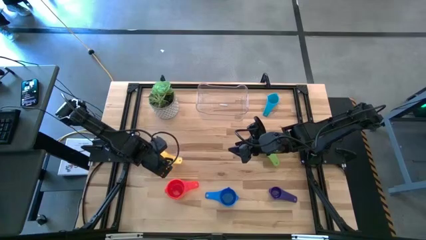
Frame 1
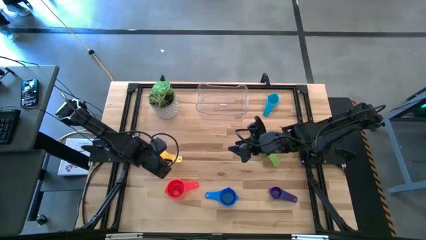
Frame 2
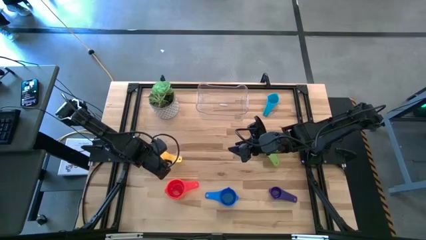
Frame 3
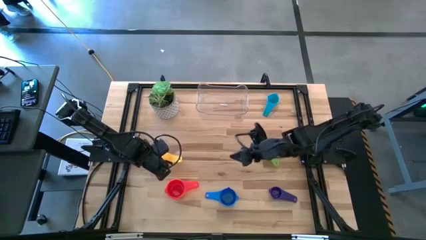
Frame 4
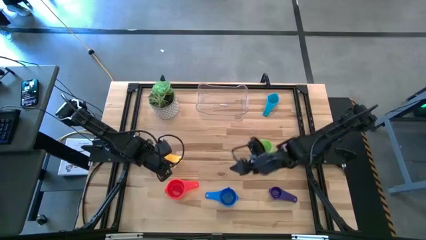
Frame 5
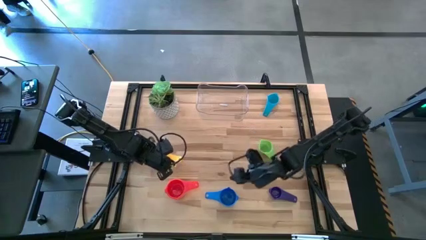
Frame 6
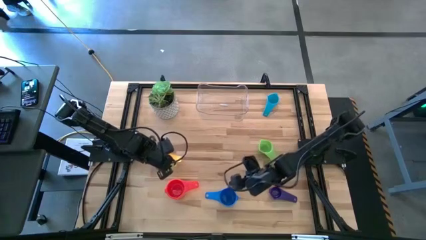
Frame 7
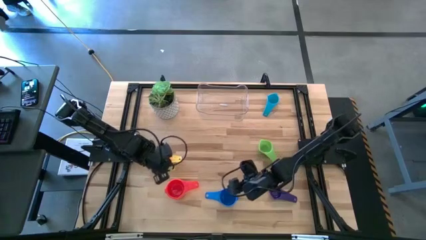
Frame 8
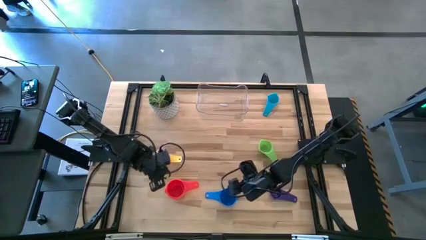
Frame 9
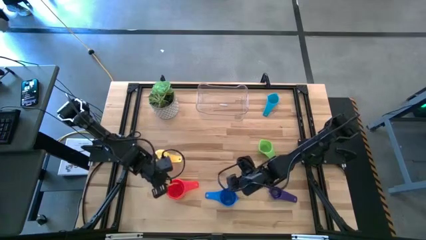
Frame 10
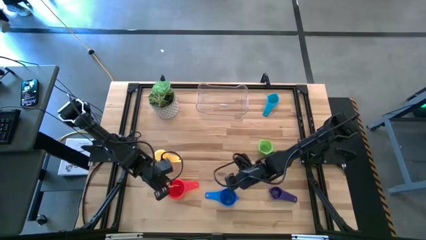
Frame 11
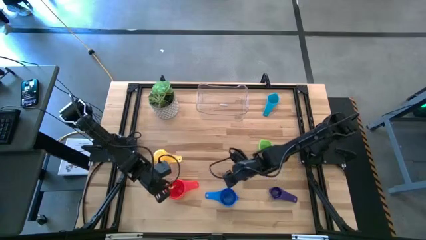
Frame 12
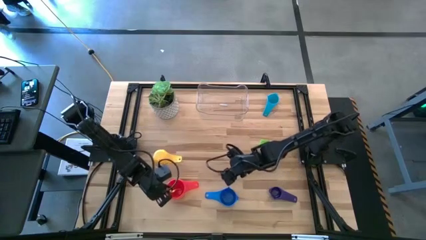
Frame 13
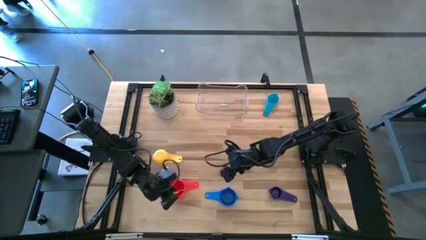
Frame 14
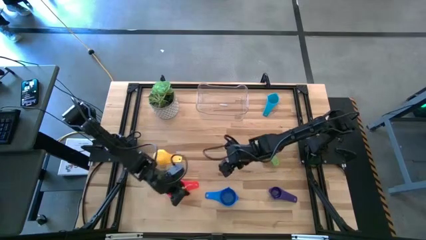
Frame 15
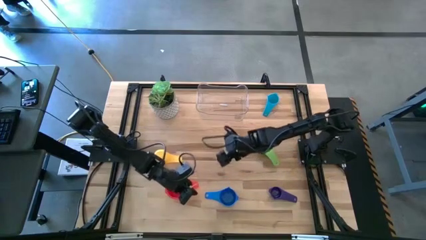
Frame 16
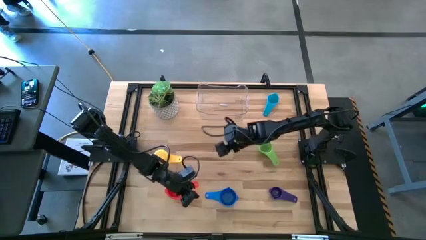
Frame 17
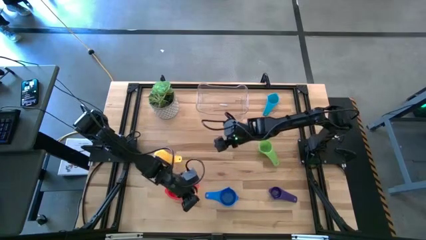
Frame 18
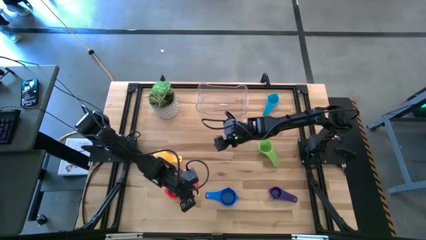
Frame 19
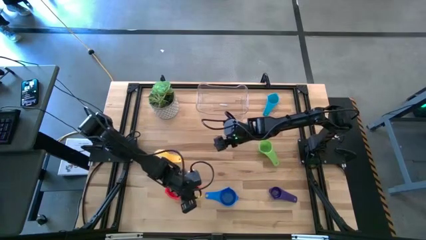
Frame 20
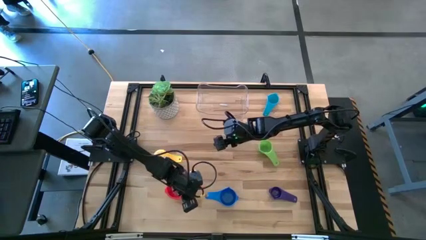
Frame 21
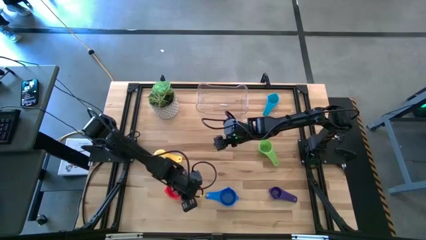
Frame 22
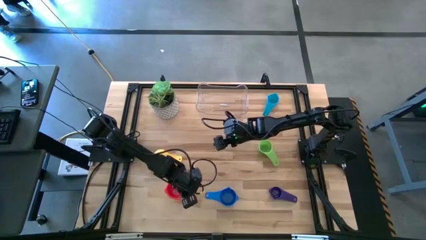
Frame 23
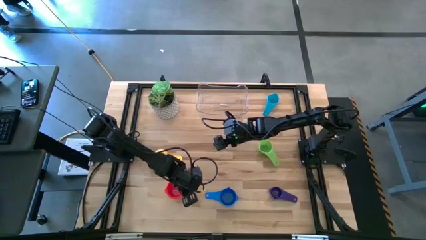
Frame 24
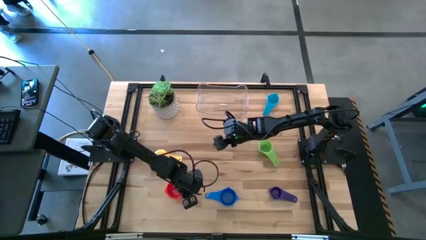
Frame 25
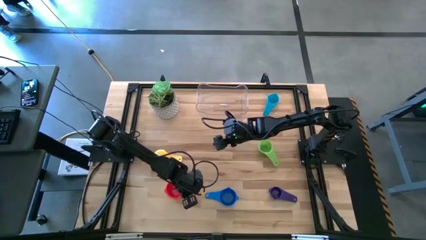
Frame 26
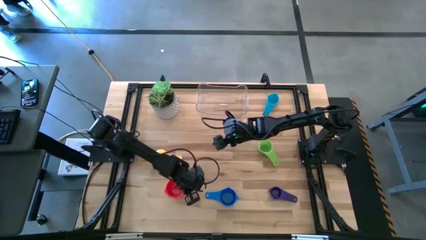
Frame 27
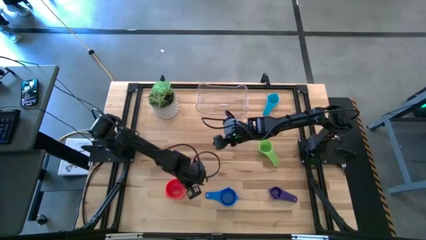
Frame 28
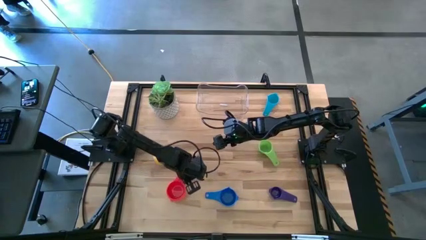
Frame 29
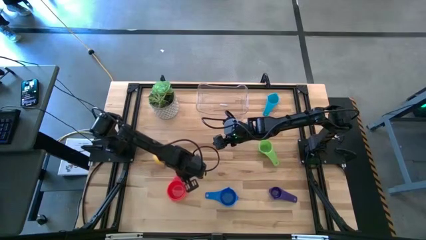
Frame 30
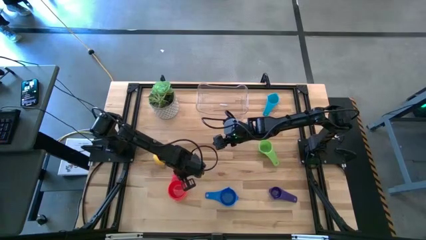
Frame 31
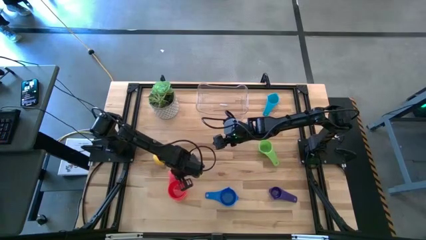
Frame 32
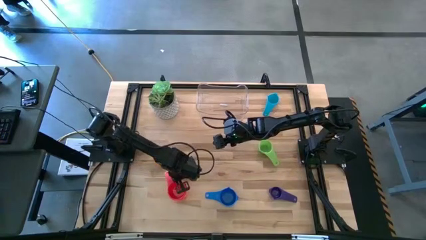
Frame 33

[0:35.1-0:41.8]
Task: Nest measuring cups in basket
Adjust the stacked measuring cups

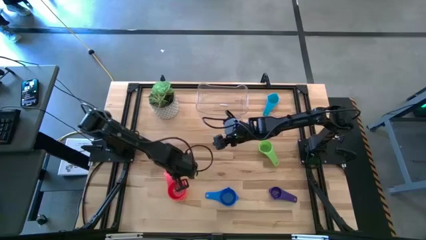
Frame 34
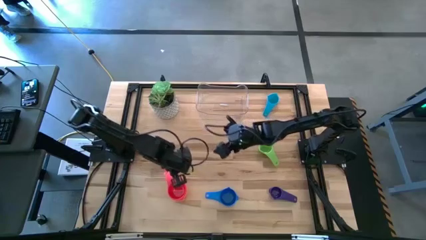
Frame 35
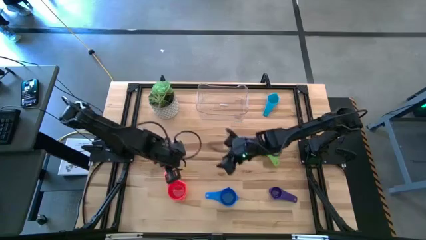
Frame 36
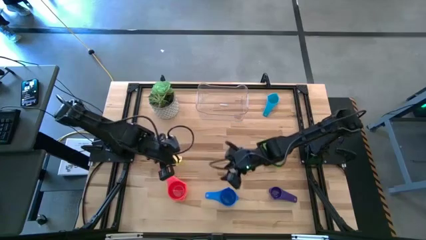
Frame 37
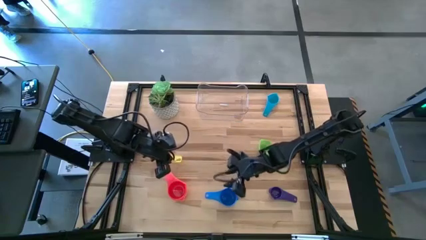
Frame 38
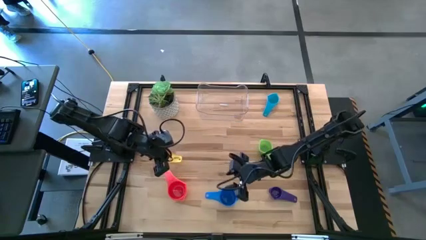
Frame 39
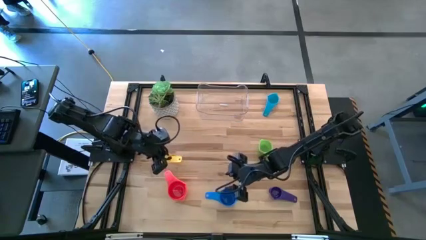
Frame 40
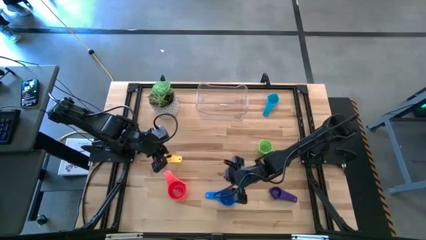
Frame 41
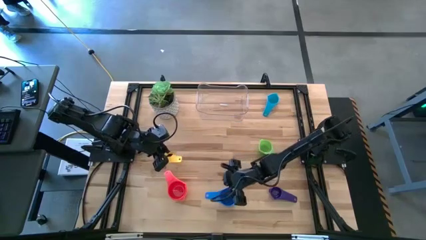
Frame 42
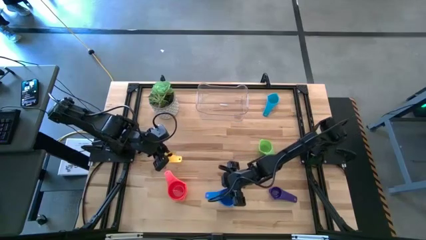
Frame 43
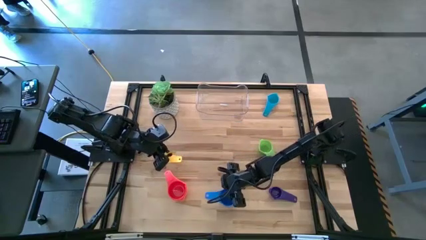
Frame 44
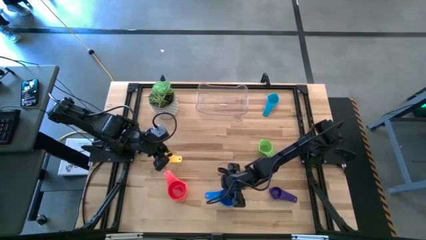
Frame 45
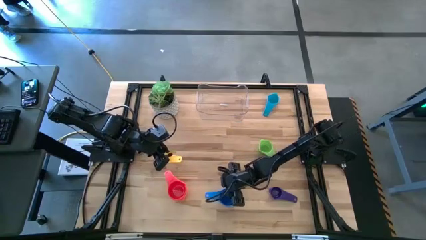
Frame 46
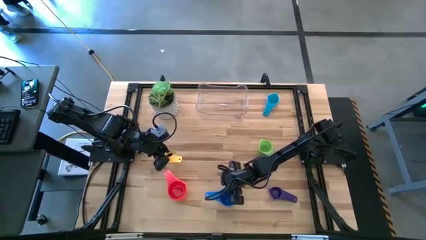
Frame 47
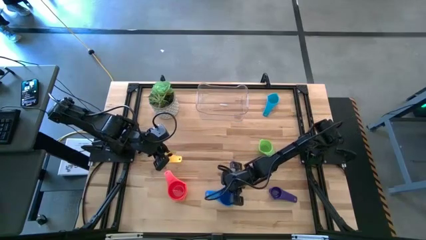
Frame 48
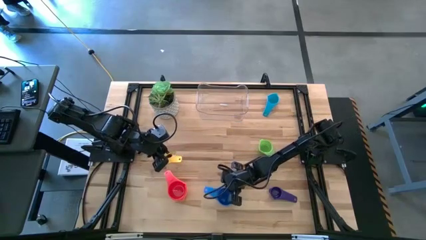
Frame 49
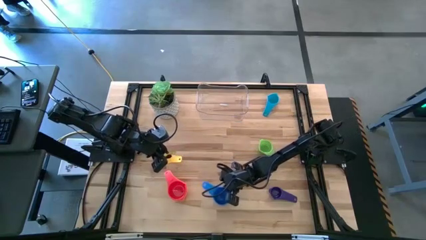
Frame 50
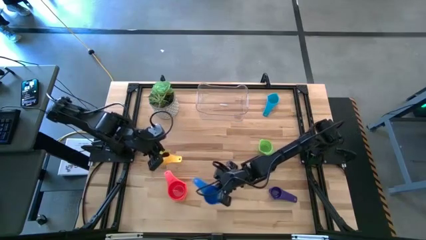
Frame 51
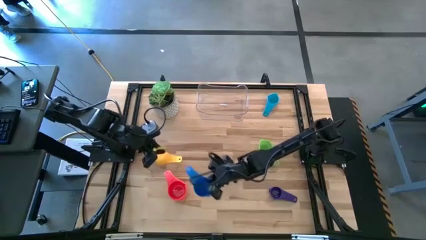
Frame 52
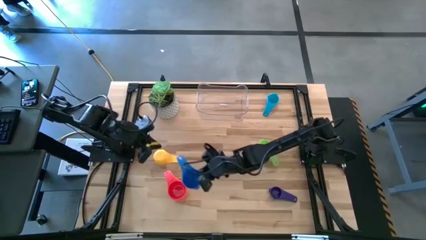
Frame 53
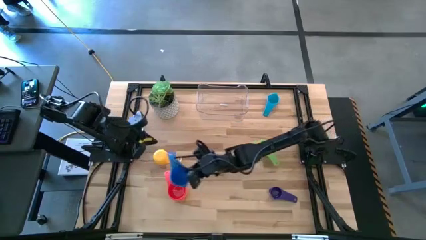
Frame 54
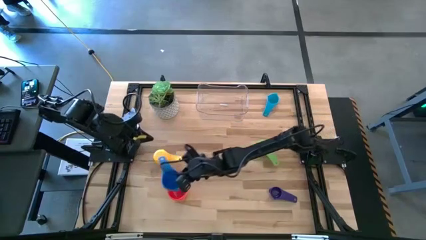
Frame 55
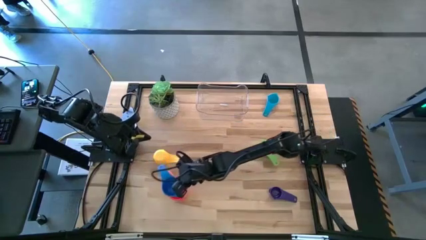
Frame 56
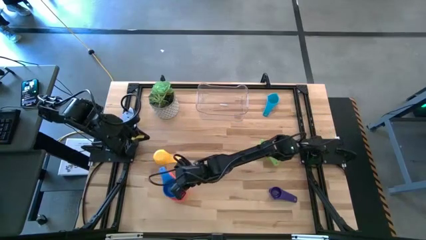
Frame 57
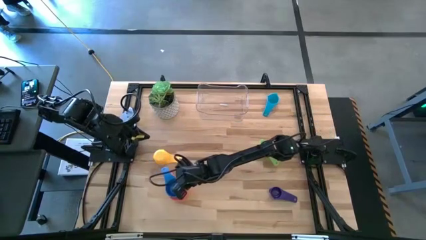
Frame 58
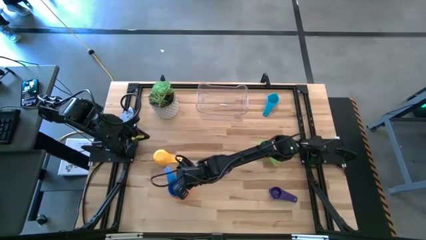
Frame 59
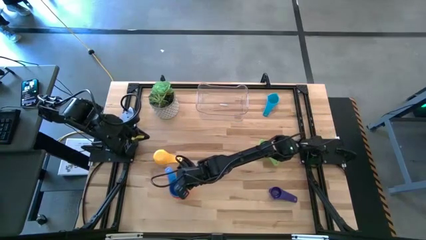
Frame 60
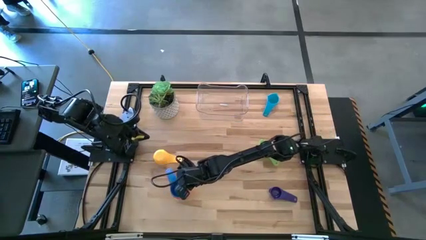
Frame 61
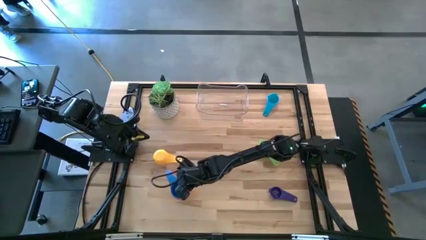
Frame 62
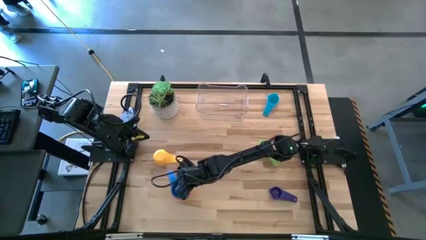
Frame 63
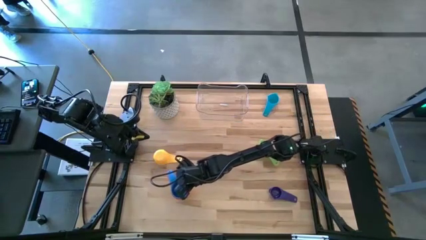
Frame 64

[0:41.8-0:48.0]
Stack the blue measuring cup on top of the red measuring cup

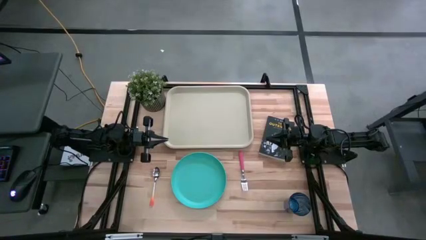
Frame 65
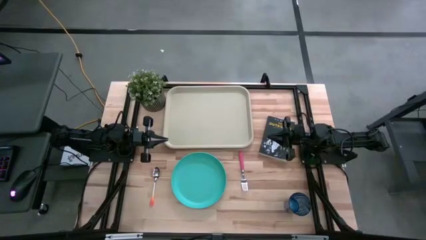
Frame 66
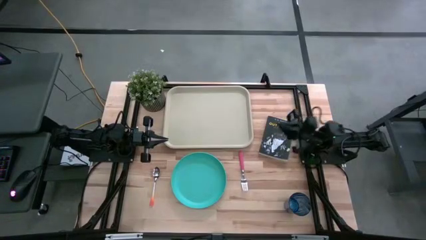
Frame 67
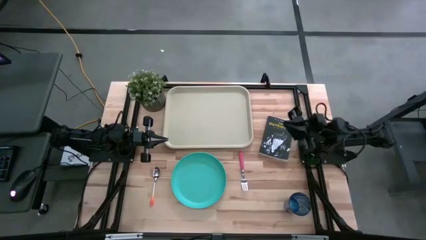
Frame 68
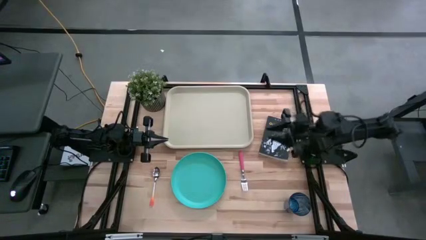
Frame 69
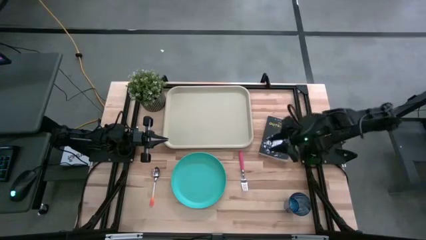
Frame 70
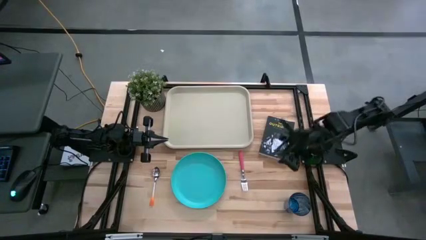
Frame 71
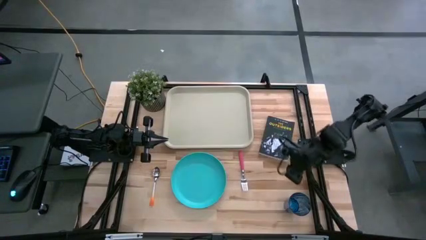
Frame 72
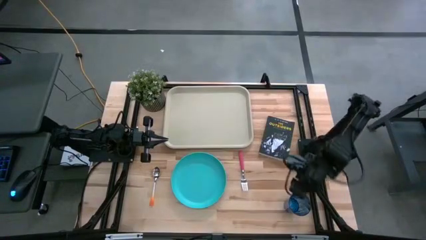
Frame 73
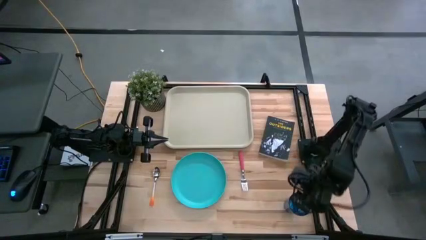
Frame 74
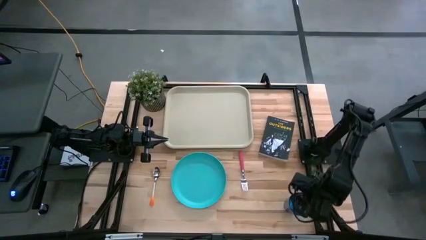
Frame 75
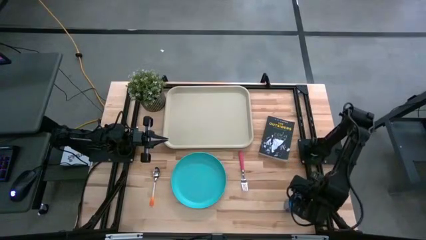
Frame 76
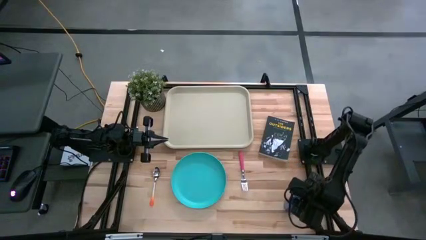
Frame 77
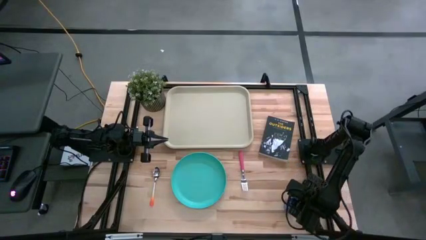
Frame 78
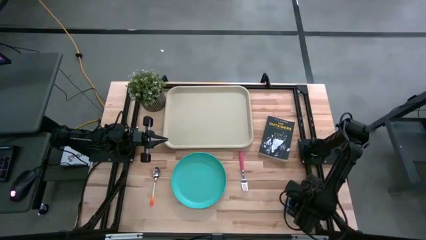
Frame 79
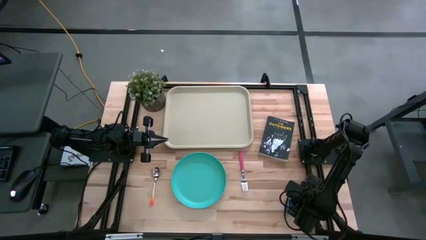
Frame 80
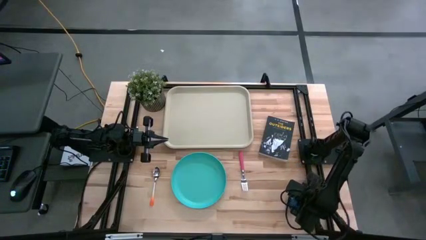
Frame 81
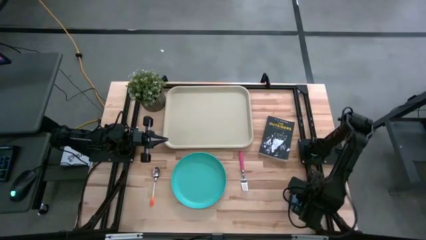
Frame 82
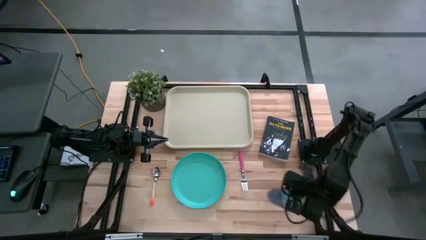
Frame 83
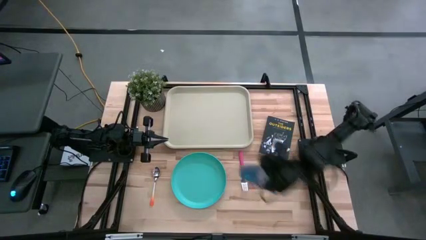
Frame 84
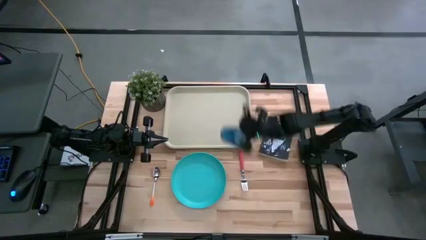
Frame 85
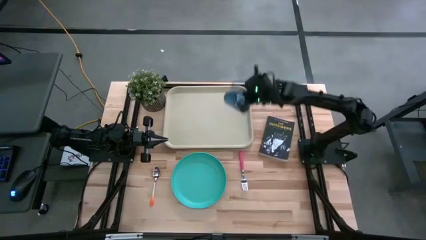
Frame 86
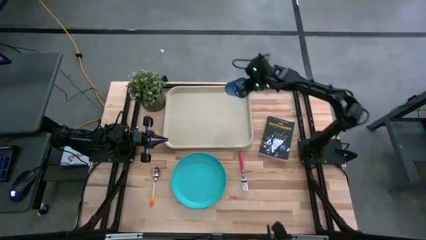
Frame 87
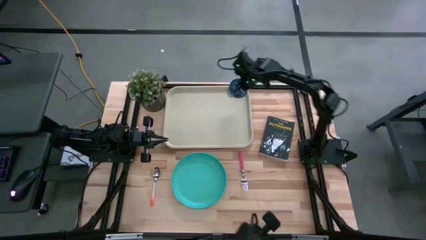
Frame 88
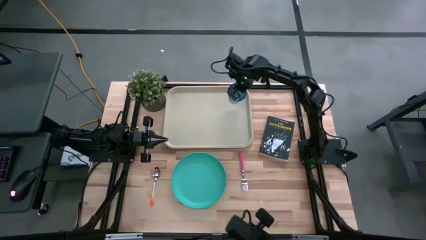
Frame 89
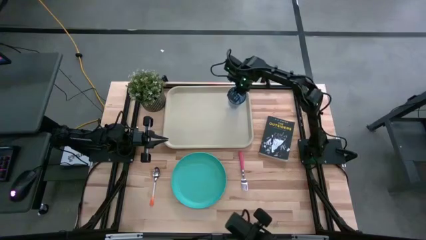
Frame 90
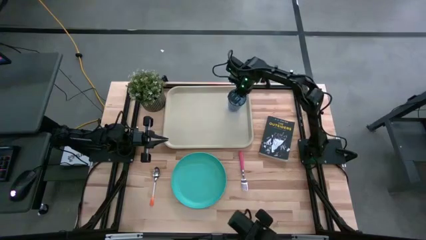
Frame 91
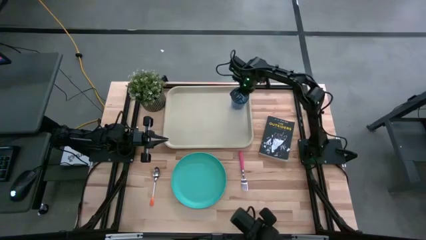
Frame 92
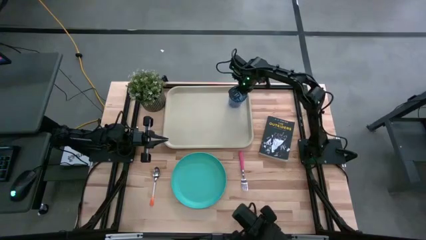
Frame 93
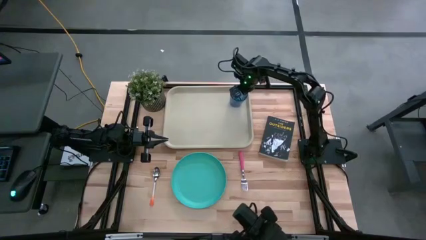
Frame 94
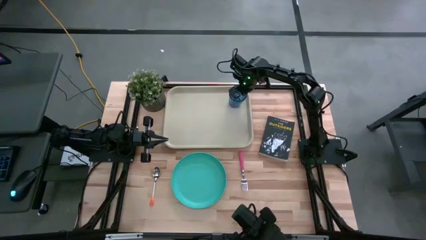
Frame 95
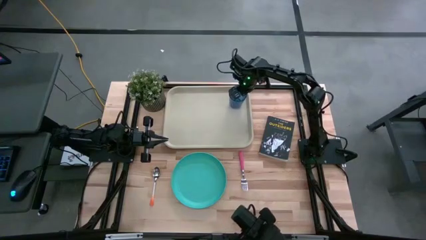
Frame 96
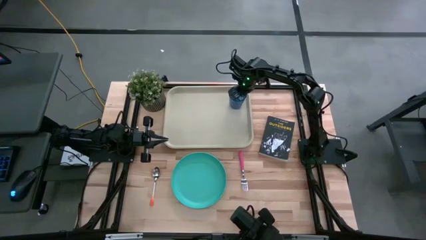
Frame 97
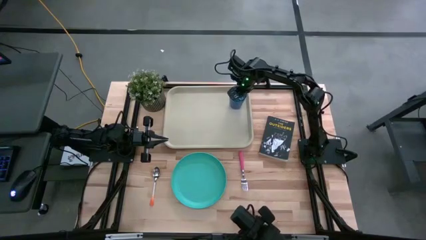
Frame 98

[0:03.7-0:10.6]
Task: Pick and place plate/cup/fork/spoon on tray
Put the blue glass on the top right of the white serving tray
